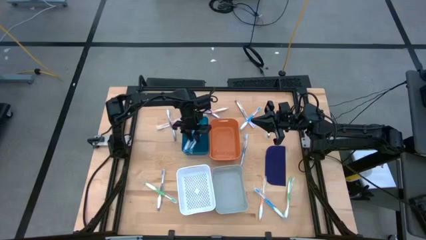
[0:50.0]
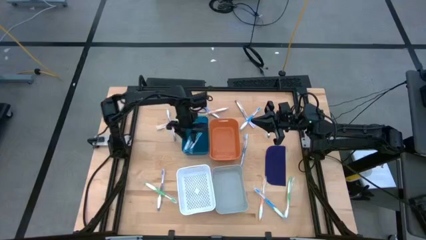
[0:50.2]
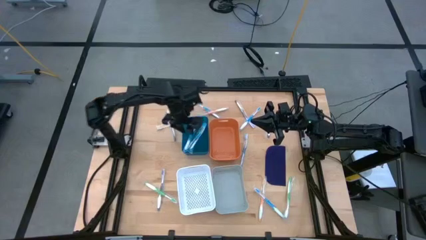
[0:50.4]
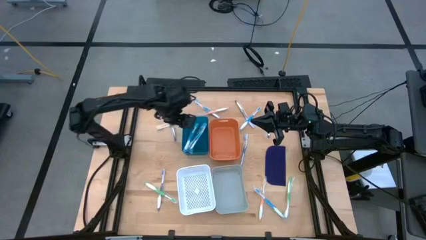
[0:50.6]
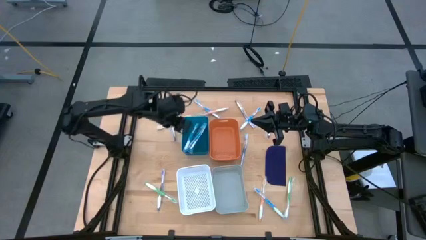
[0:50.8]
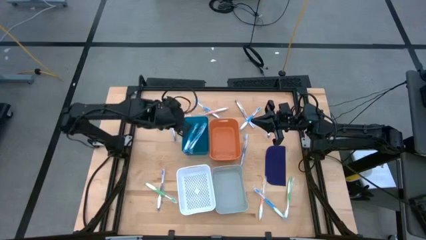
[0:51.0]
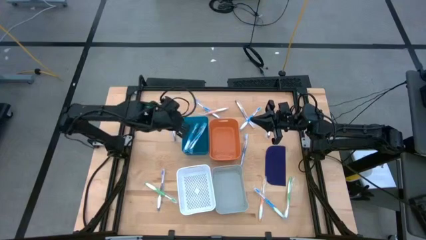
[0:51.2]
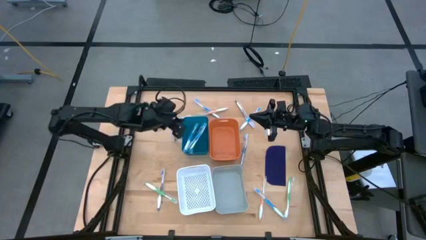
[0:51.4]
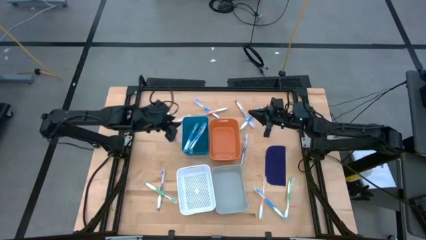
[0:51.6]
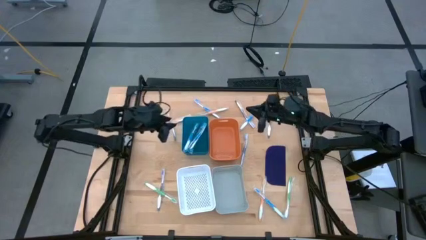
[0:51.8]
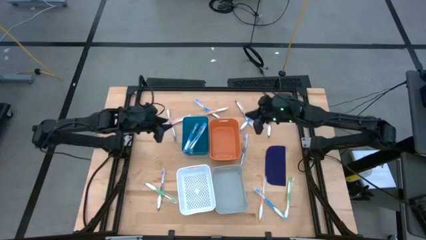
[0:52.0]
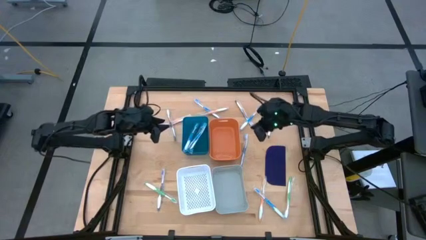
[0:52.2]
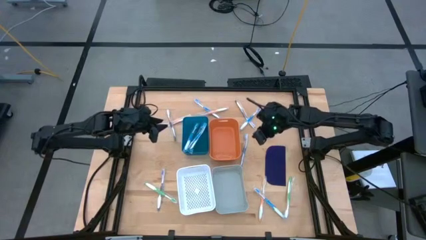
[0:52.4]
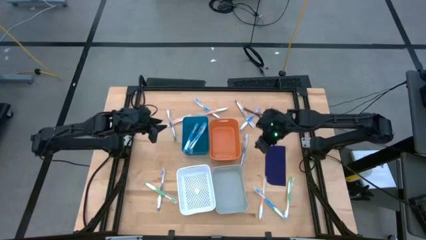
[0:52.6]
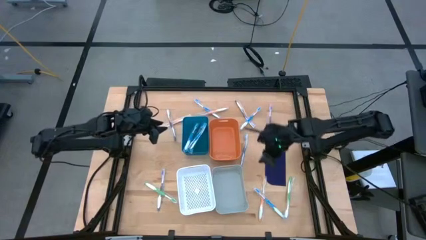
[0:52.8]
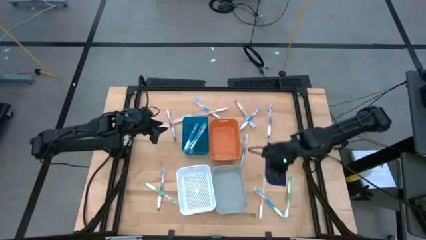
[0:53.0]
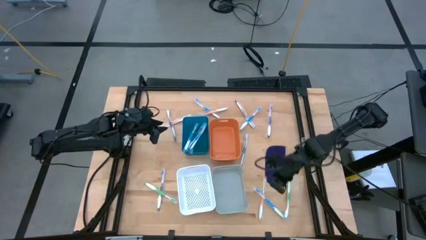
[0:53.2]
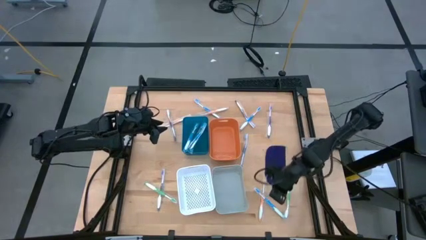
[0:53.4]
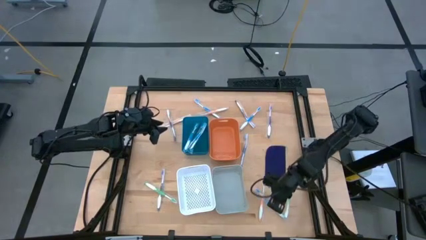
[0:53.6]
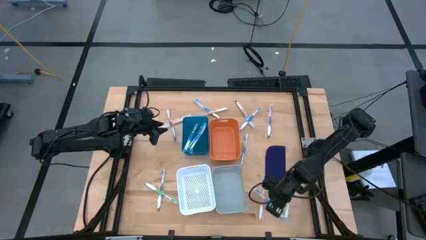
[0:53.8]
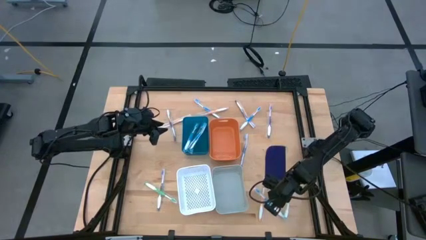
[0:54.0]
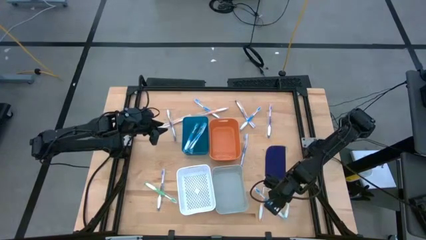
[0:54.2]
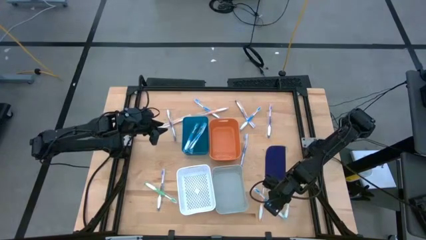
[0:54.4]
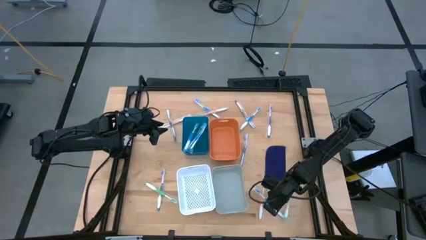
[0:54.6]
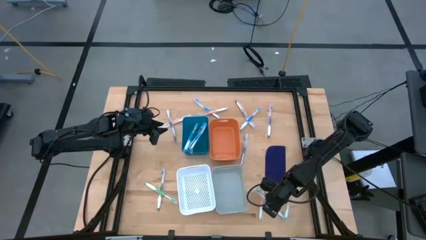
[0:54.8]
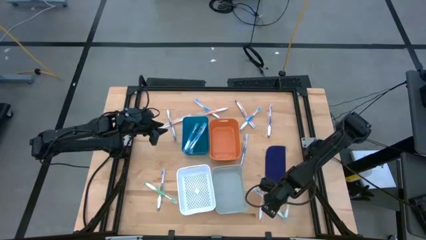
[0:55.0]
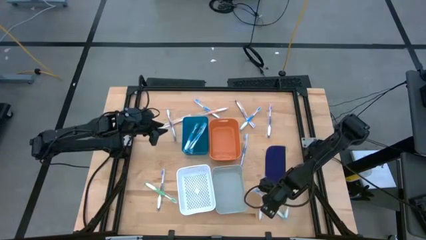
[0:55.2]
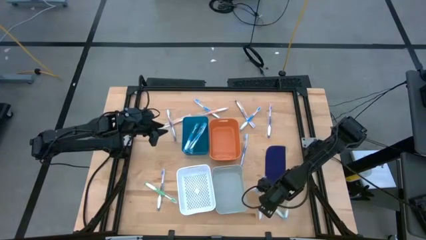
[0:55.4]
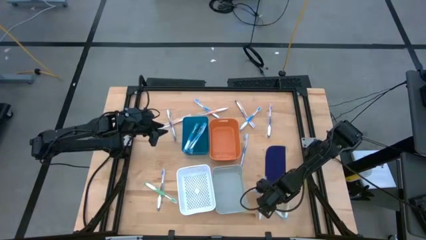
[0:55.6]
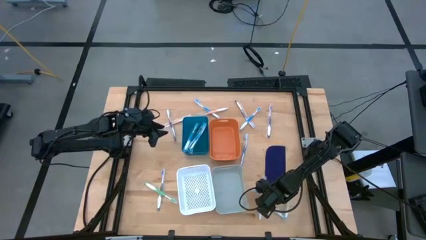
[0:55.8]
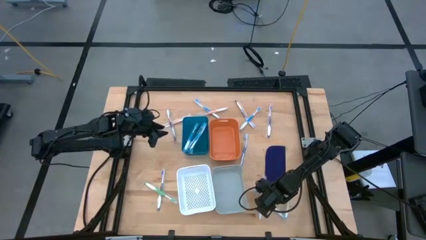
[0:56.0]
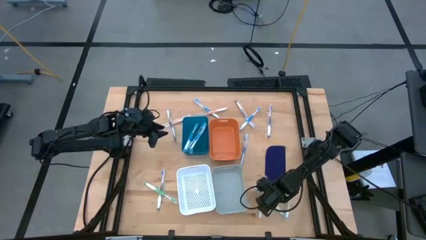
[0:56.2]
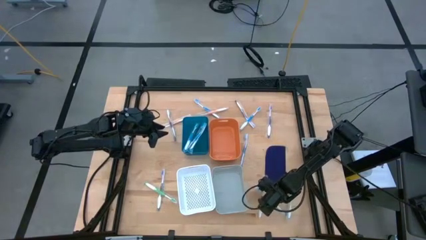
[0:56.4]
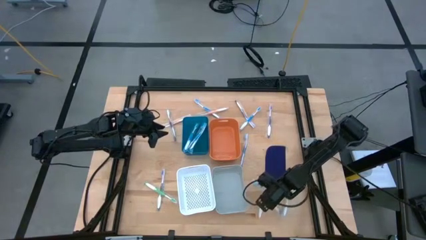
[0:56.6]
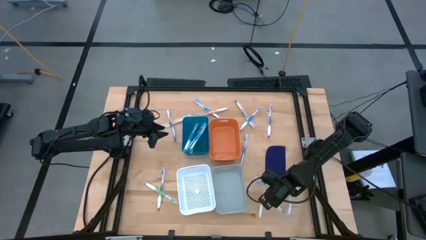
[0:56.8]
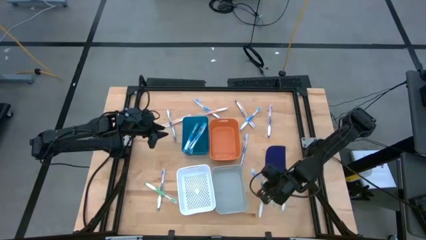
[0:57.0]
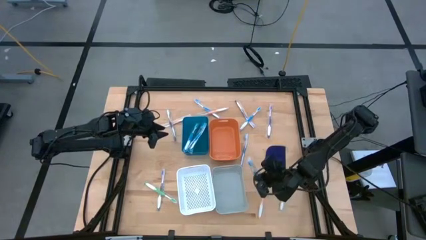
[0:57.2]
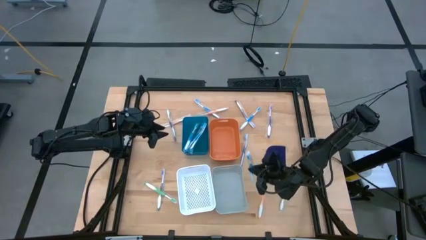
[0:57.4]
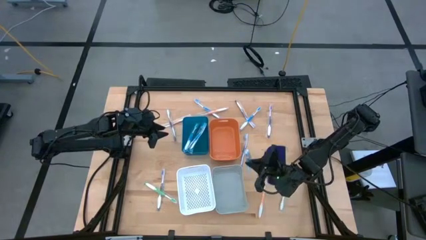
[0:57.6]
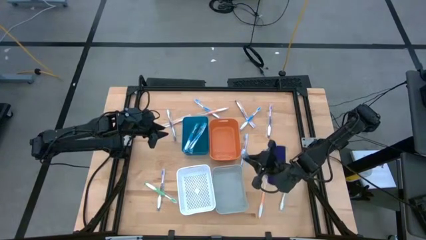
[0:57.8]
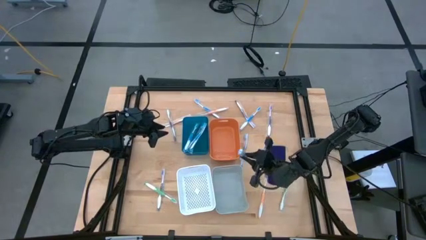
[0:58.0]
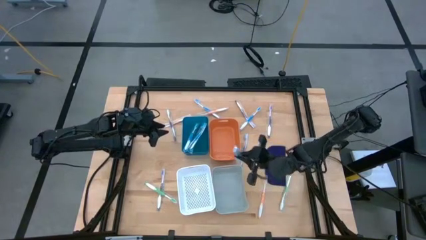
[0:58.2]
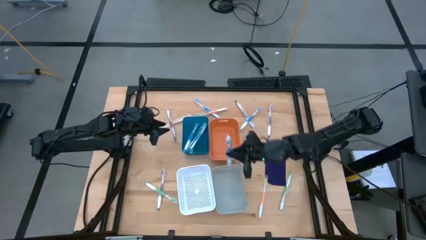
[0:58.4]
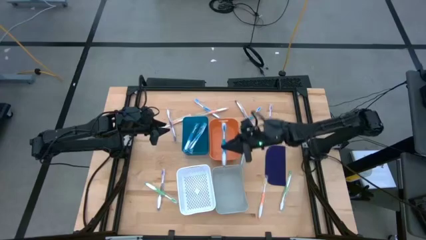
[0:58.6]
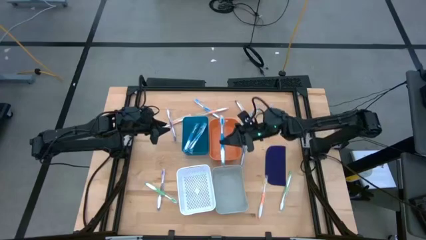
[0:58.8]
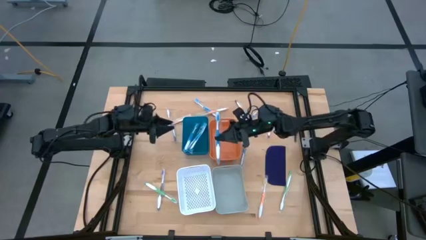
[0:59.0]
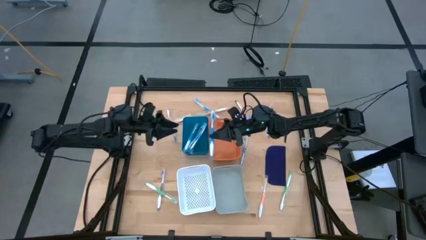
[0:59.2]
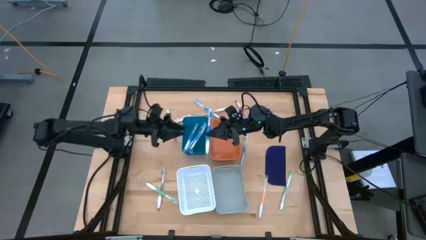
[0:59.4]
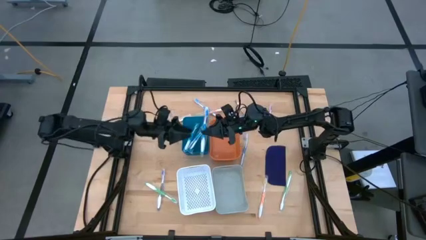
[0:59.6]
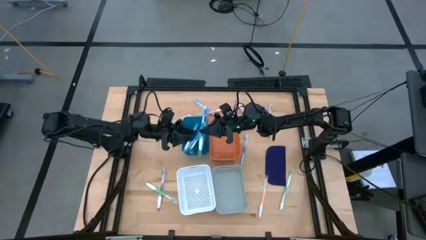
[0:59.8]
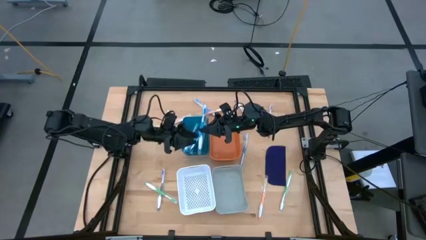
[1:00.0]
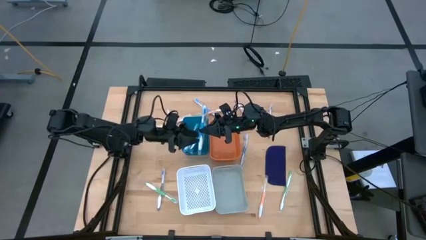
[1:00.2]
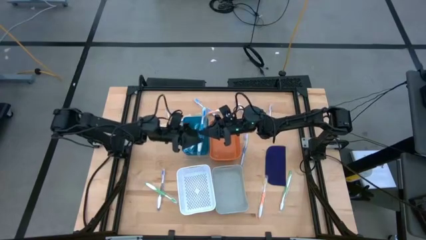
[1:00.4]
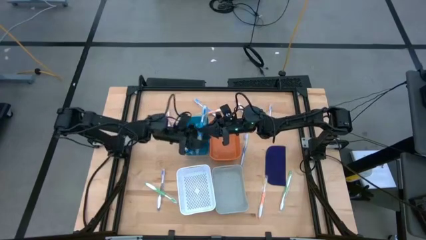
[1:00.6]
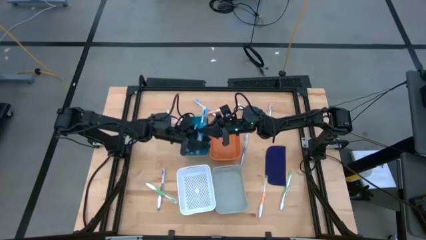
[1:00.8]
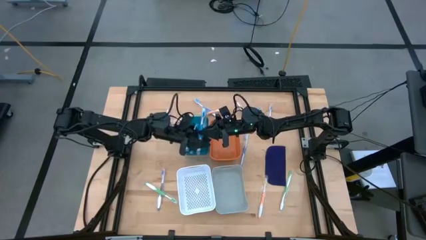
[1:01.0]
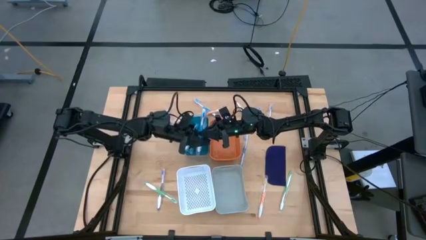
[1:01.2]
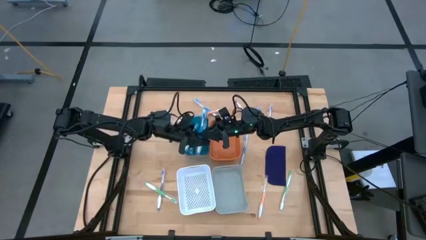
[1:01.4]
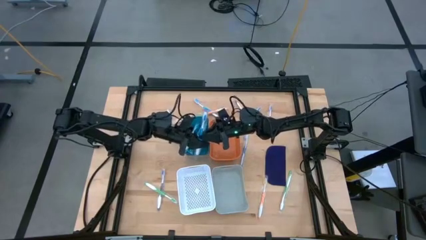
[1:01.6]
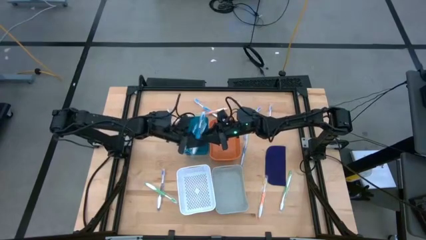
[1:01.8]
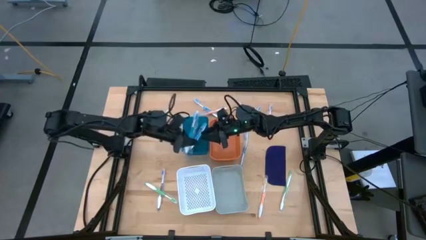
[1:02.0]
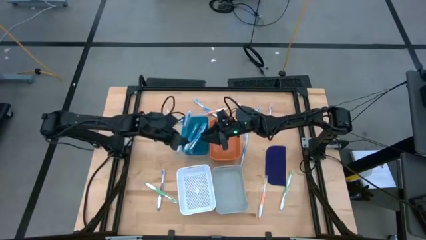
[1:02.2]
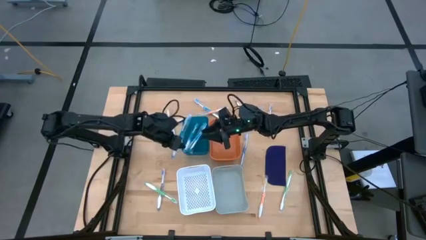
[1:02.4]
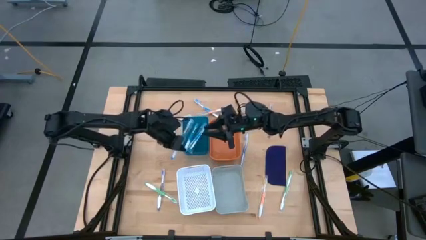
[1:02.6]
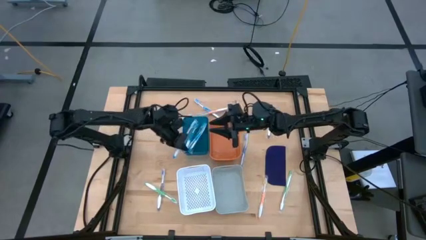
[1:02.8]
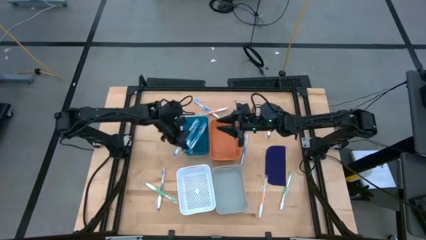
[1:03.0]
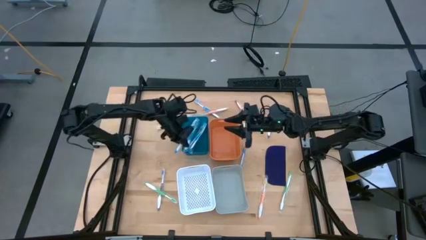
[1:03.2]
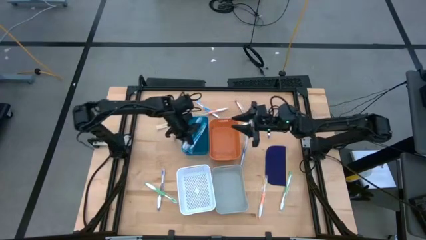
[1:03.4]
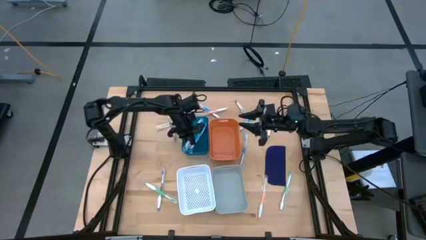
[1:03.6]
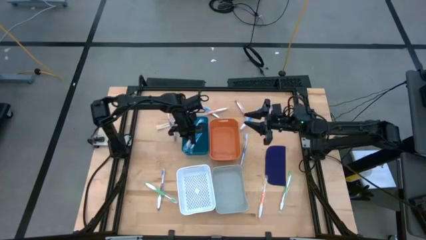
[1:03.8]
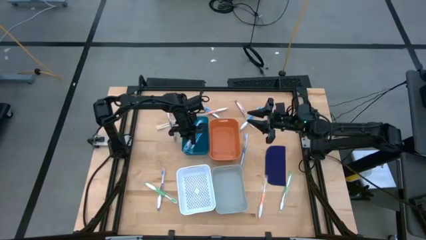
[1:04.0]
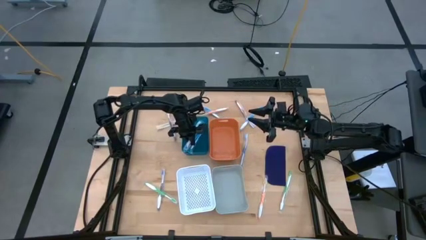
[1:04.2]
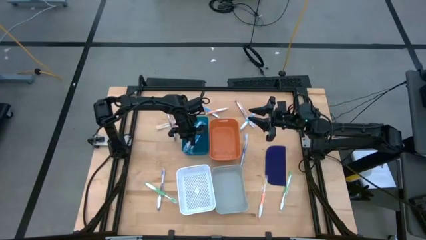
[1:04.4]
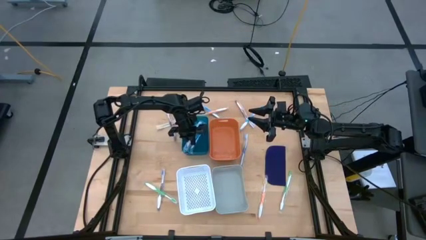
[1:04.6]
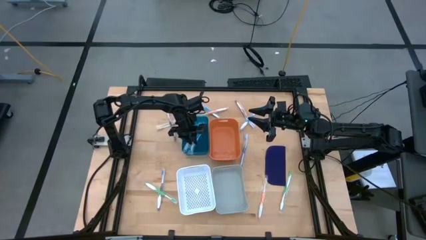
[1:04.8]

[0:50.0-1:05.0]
Task: Pick & Place Toothbrushes
Put the blue toothbrush into the blue bin

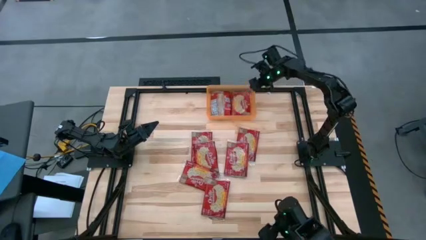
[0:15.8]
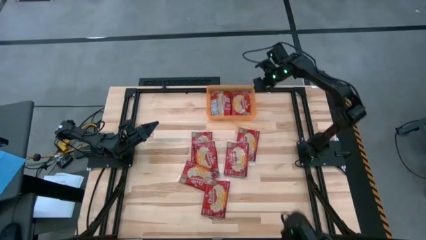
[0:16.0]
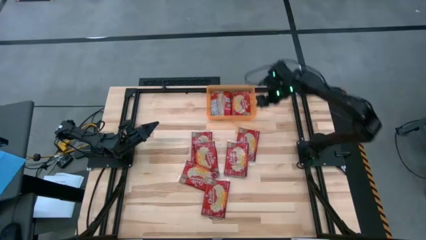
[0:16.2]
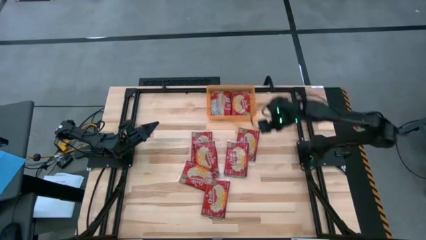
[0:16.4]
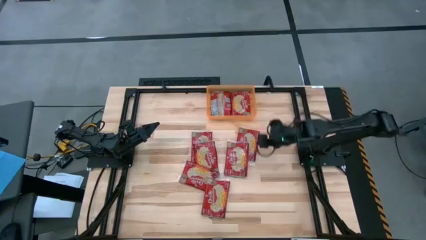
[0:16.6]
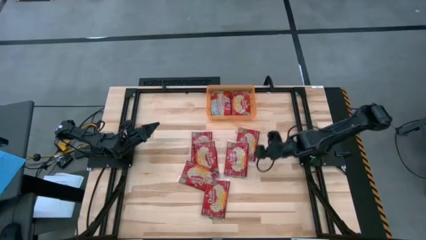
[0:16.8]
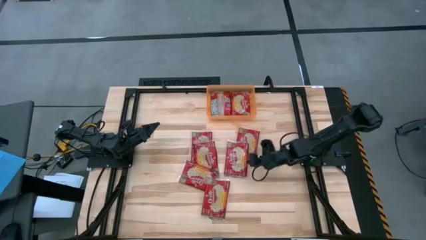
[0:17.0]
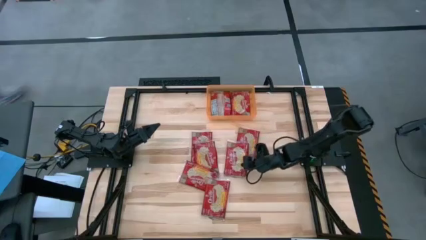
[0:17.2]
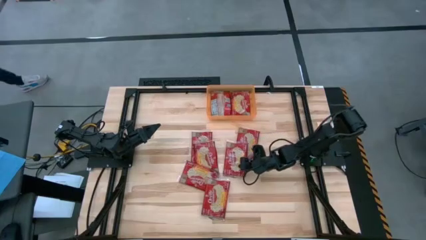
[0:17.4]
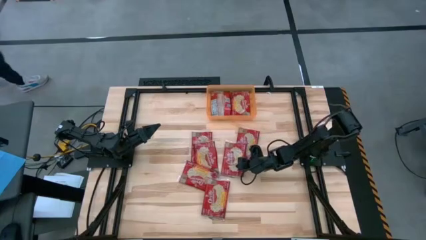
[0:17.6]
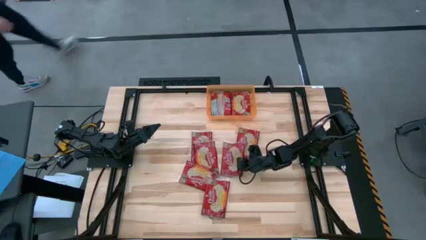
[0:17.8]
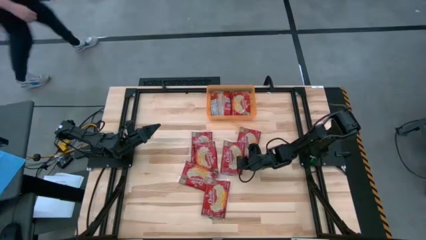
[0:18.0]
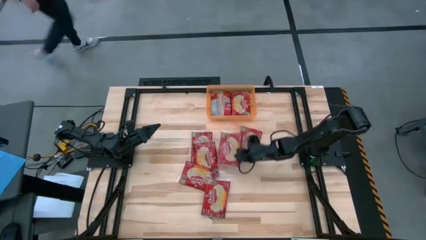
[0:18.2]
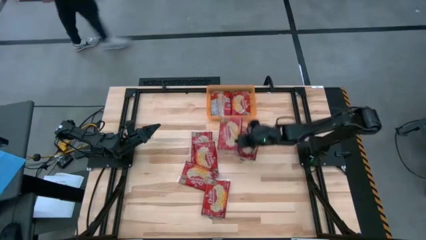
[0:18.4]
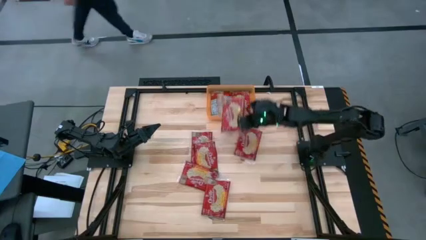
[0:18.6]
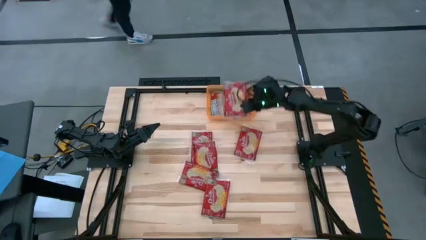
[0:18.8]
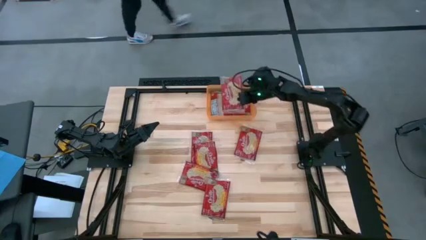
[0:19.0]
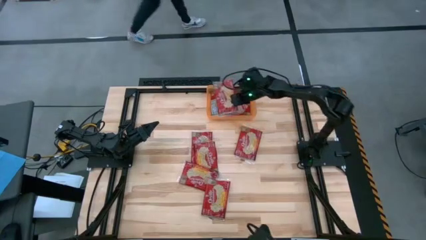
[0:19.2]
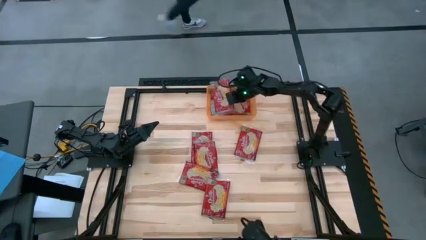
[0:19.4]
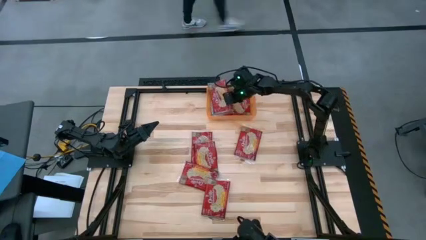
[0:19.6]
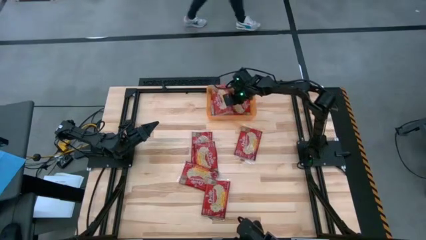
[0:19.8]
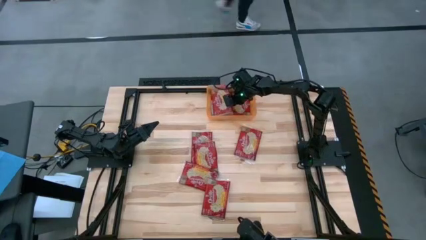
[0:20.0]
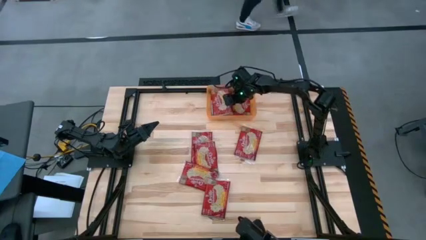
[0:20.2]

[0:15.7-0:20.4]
Task: Sort popcorn bags into baskets
Put the red popcorn bag into the orange bin
